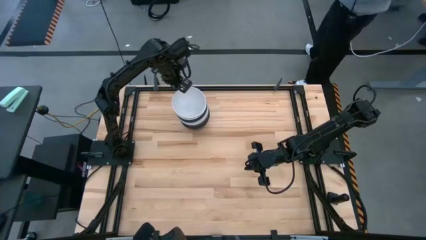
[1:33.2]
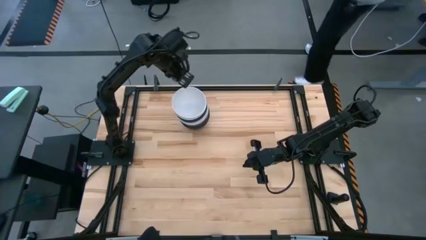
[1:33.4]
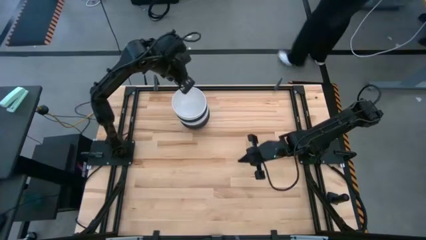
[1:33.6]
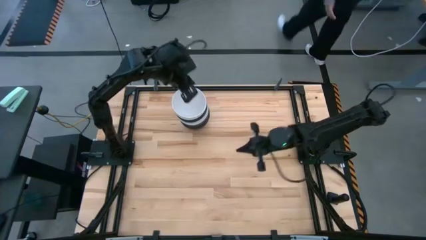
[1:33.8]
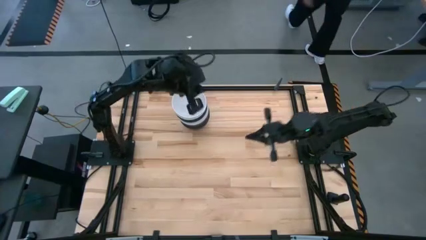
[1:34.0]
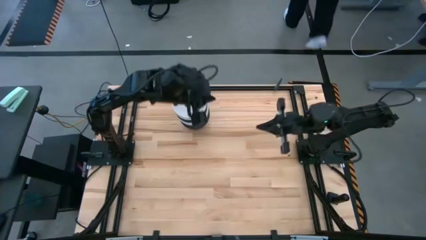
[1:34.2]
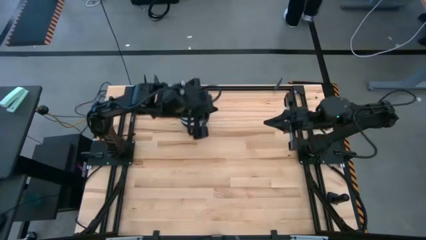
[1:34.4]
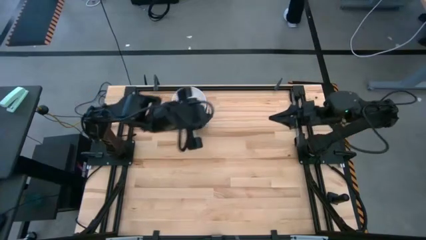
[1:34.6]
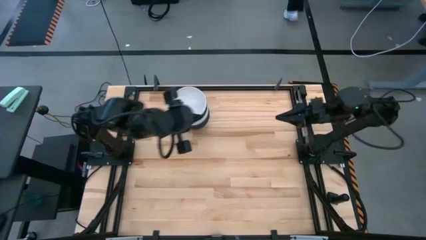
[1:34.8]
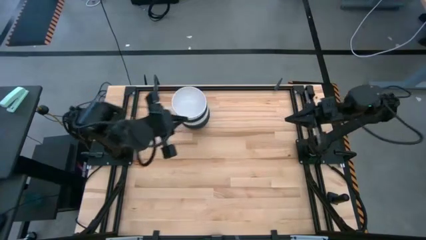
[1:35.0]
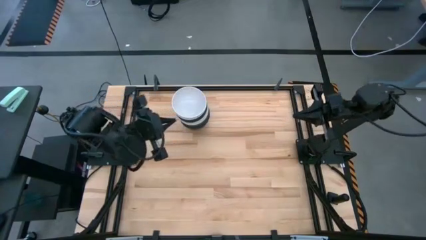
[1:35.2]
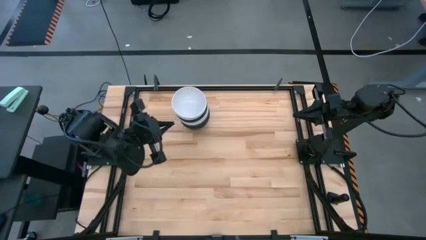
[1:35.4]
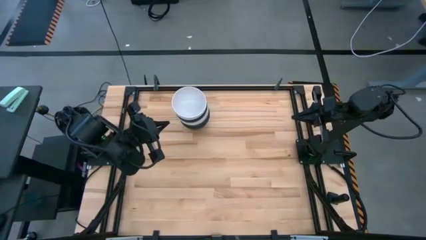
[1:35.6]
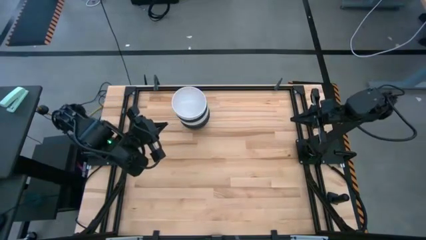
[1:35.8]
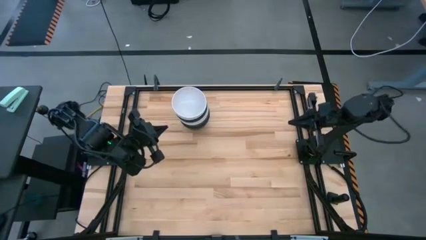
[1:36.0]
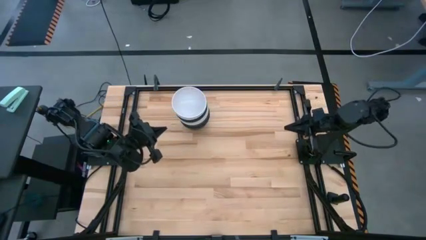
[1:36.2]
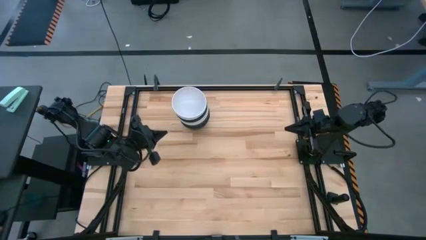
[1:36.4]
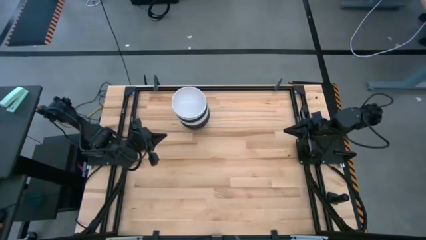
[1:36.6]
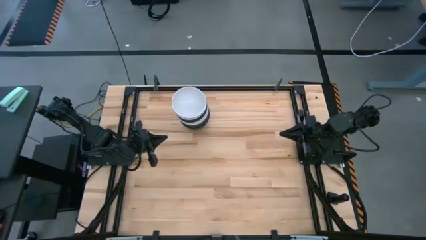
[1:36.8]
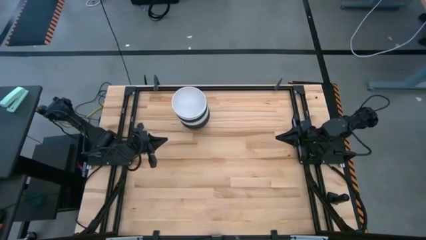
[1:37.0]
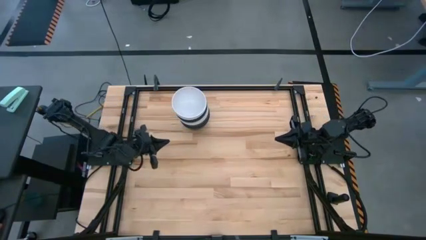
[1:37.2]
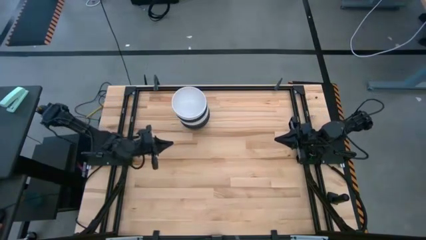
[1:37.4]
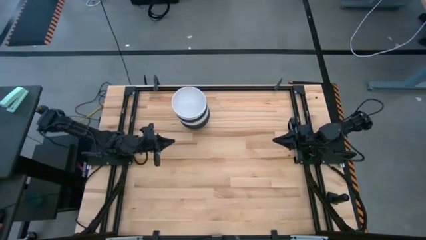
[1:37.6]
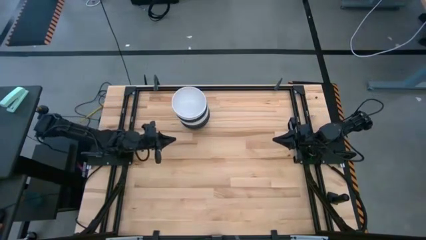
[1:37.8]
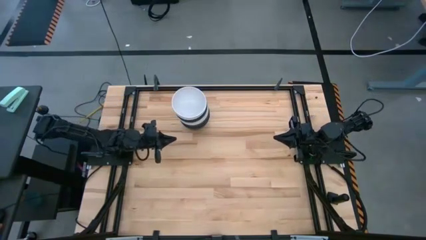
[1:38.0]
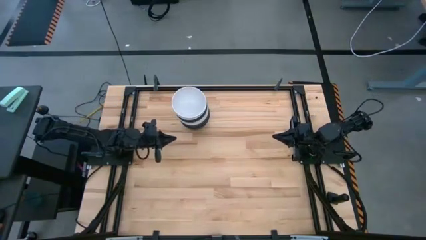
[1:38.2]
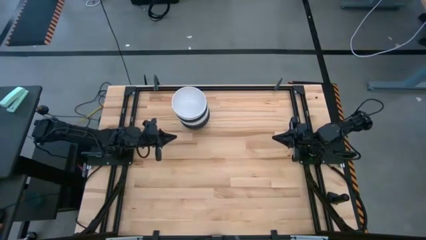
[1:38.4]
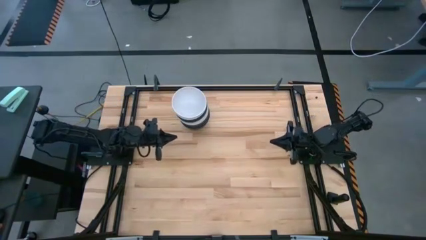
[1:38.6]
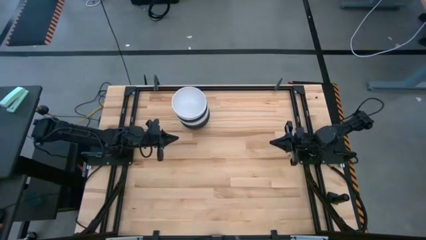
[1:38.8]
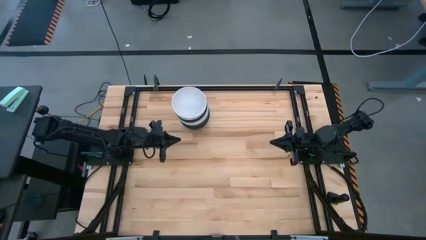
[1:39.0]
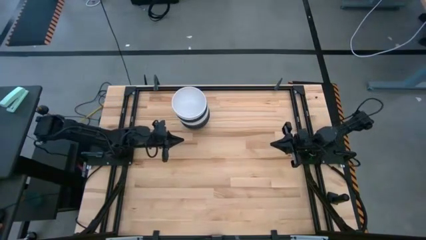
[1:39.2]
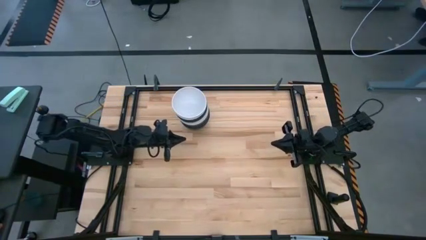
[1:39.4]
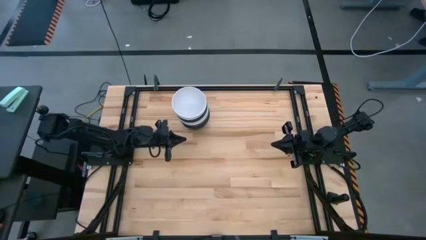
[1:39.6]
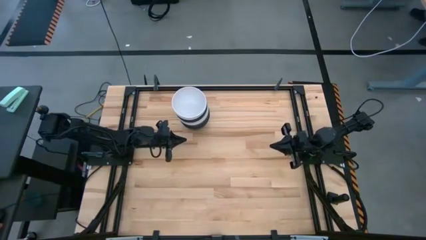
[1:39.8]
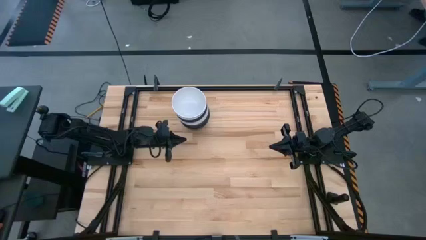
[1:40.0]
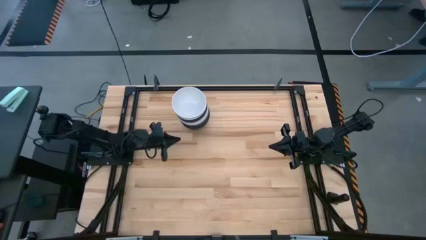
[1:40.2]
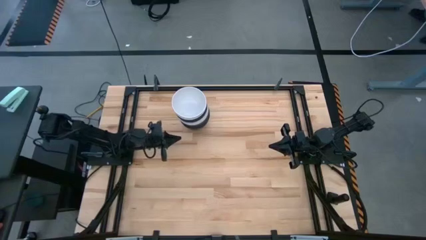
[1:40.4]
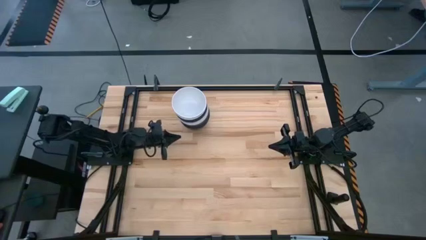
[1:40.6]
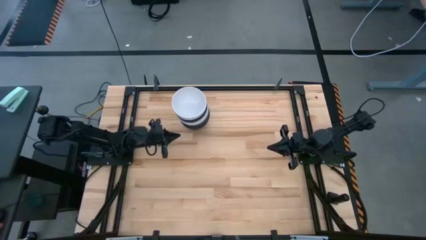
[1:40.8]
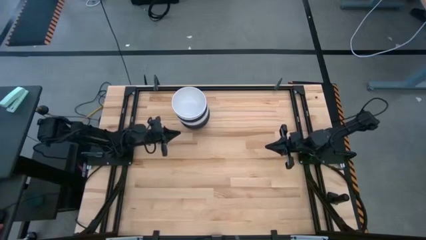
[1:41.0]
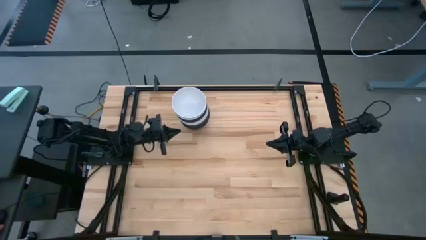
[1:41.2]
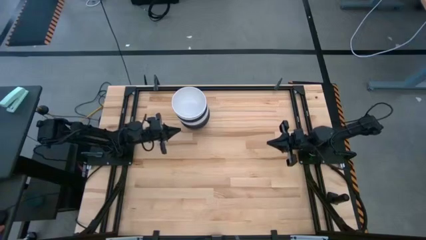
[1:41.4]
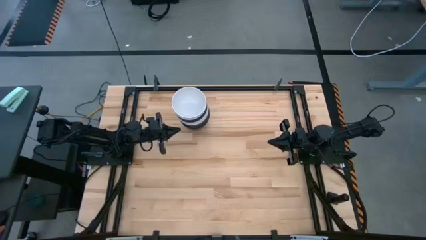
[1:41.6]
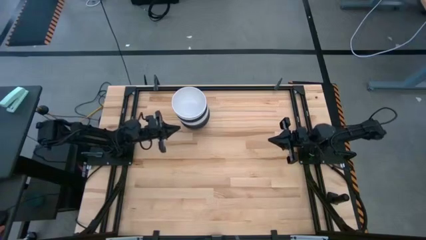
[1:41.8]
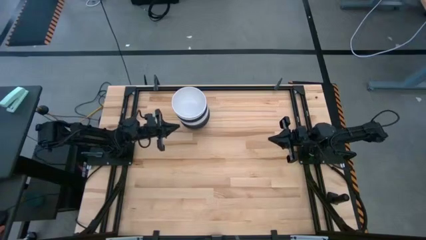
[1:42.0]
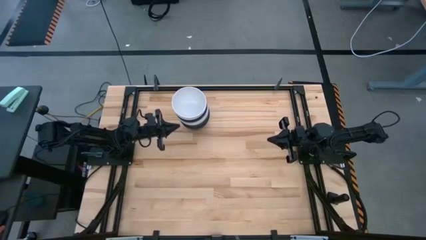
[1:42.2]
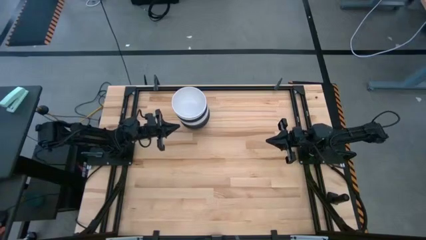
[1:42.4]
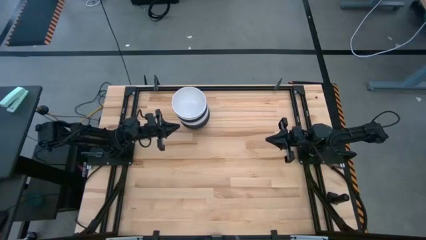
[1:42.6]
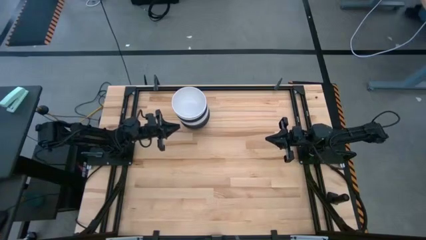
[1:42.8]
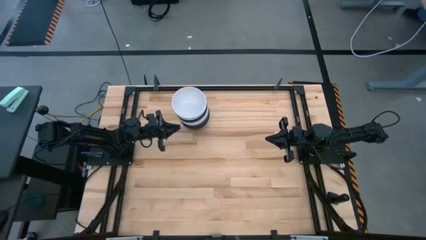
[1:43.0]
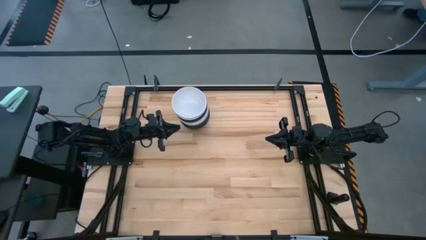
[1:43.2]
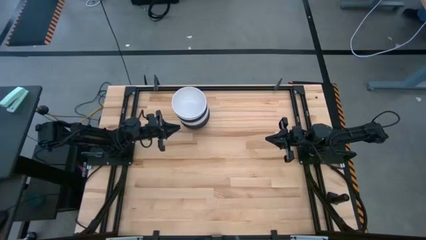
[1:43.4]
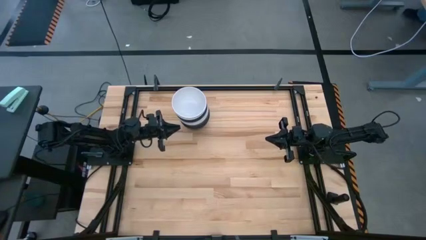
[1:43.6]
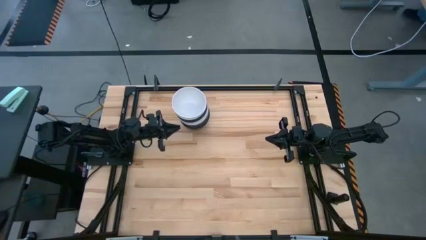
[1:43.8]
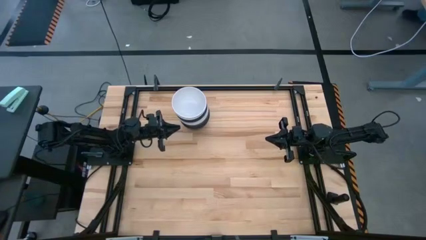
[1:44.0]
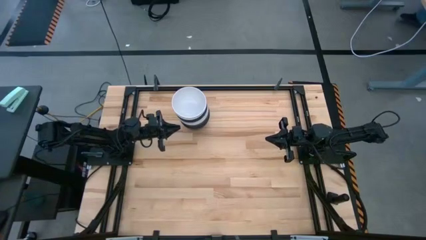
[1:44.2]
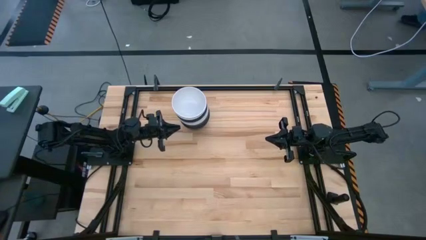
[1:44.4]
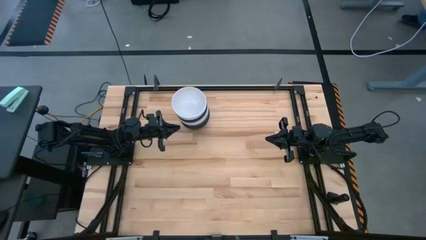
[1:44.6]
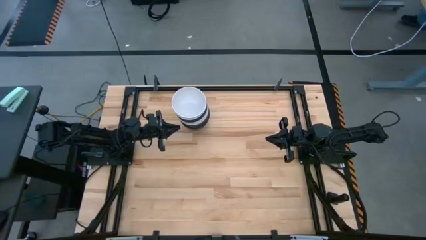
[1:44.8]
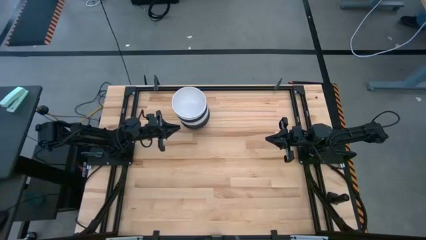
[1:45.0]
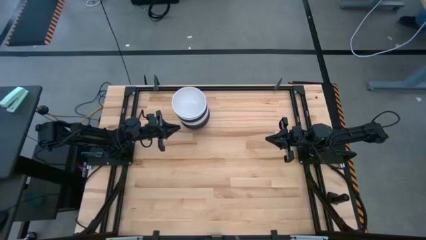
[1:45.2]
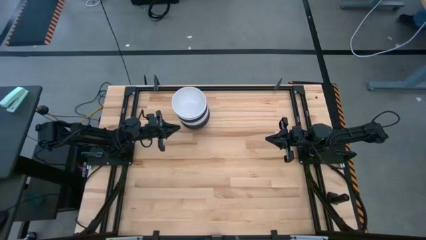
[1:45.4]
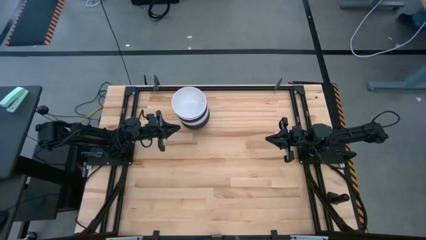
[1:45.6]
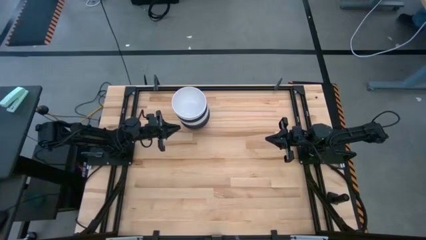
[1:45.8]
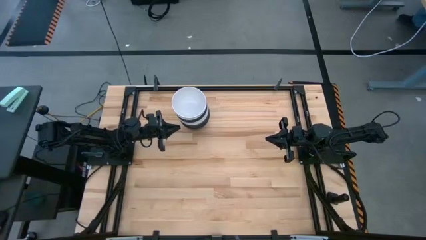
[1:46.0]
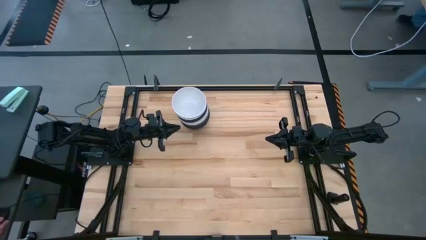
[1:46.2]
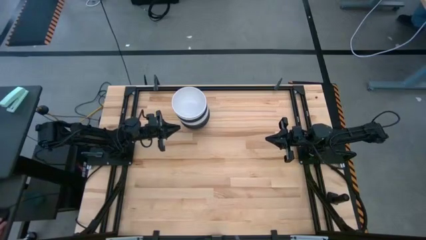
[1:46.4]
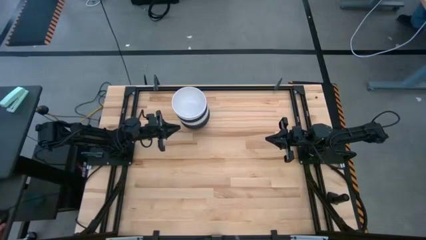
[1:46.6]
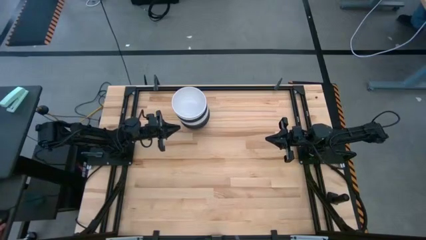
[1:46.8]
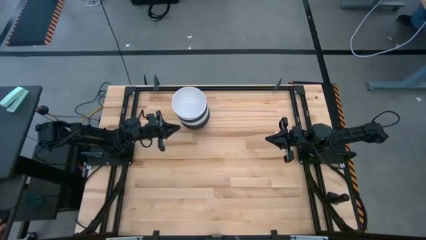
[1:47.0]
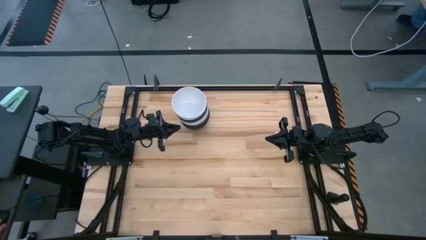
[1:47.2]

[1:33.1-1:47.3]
Task: Nest bowls inside each other
Return to Home Position

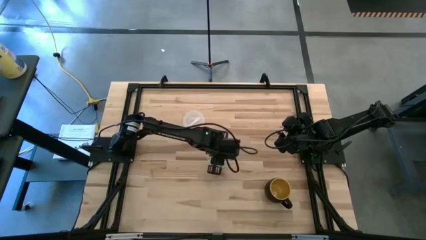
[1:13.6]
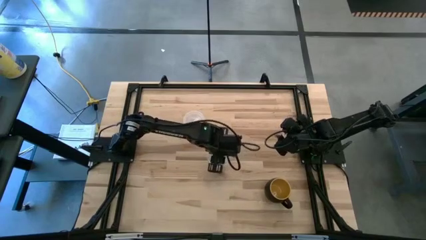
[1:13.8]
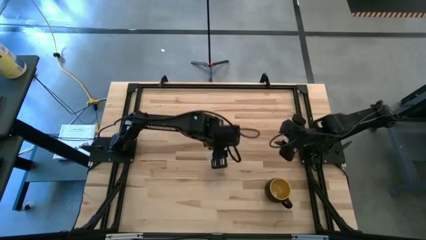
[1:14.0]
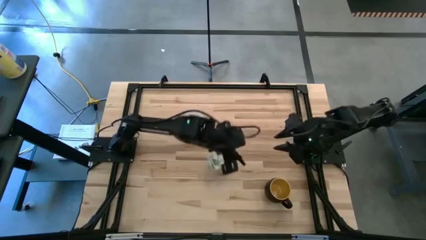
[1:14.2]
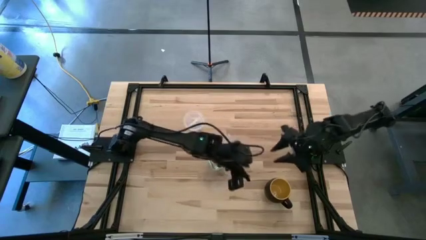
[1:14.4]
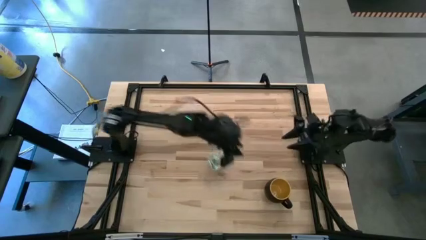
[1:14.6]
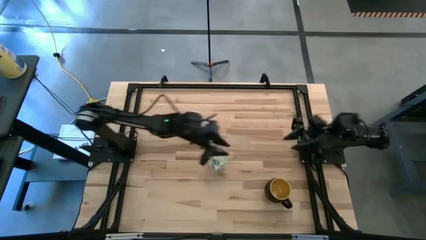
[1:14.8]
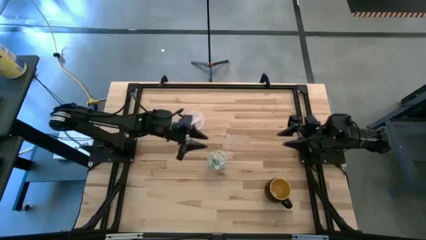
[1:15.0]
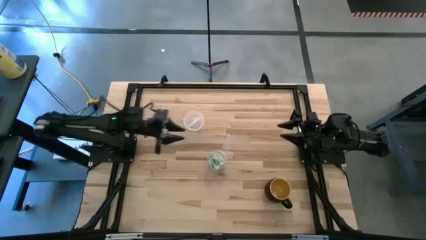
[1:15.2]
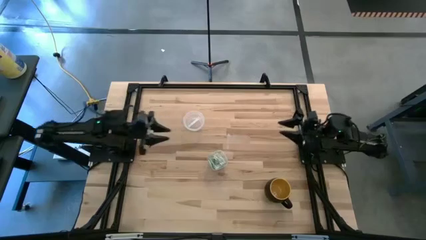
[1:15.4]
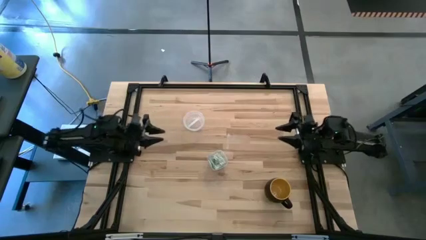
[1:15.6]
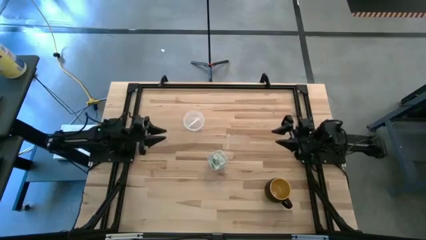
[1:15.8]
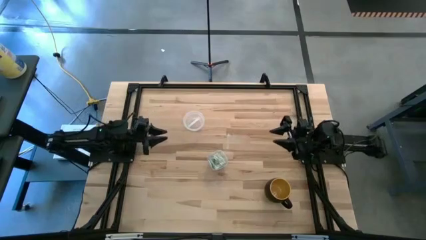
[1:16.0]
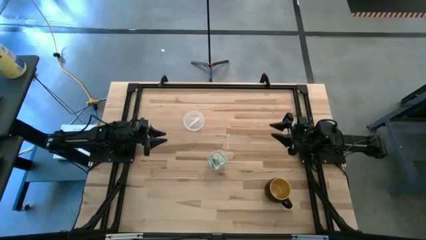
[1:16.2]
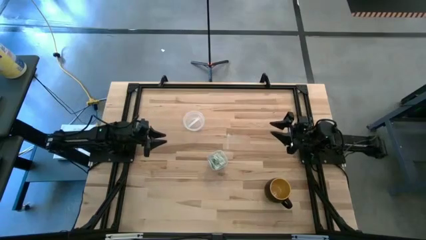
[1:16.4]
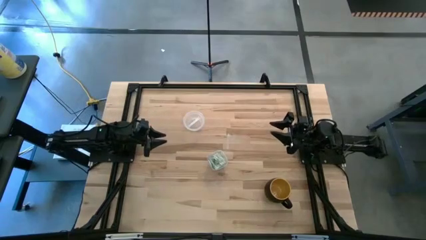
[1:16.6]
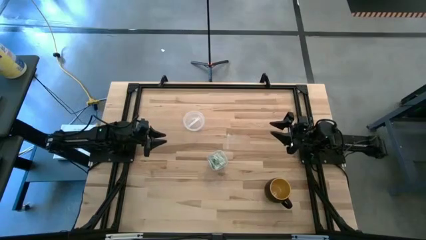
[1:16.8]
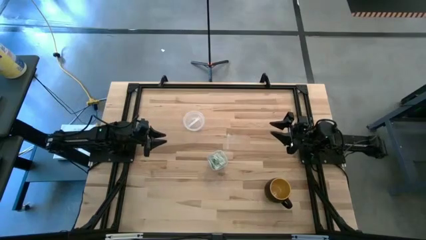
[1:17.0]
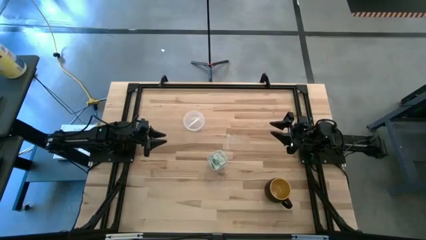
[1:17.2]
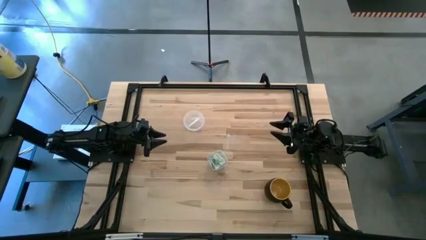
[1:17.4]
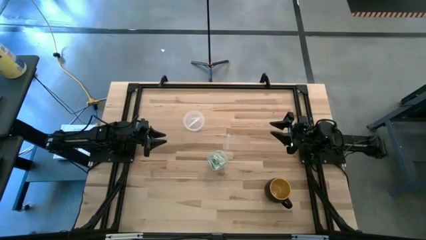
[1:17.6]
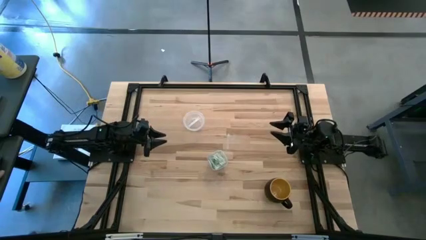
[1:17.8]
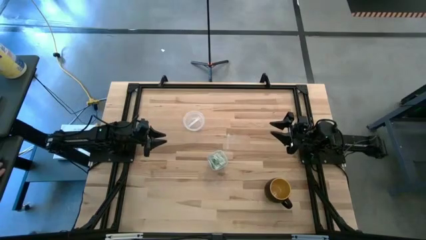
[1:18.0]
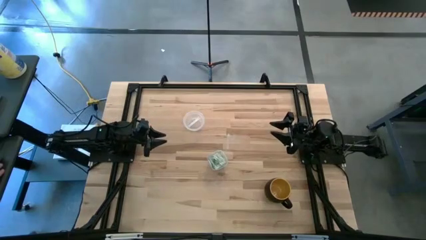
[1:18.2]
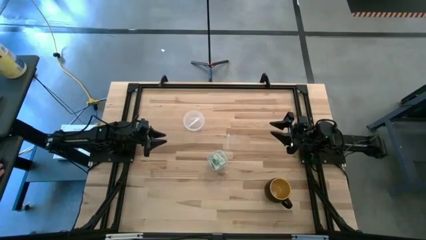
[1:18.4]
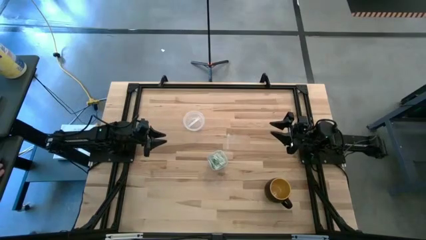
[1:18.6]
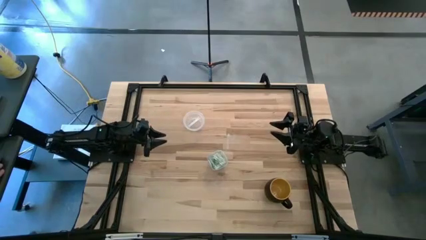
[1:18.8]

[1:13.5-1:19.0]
Task: Pick and place items into bin
Return to Home Position
